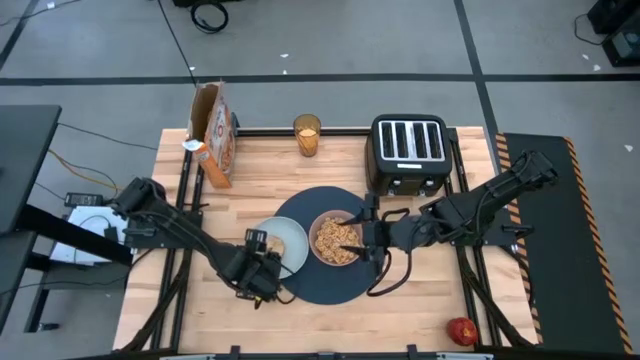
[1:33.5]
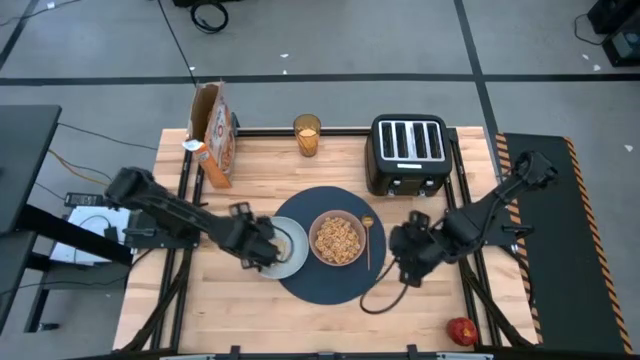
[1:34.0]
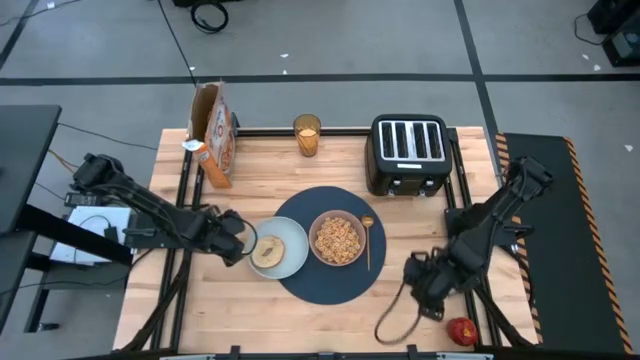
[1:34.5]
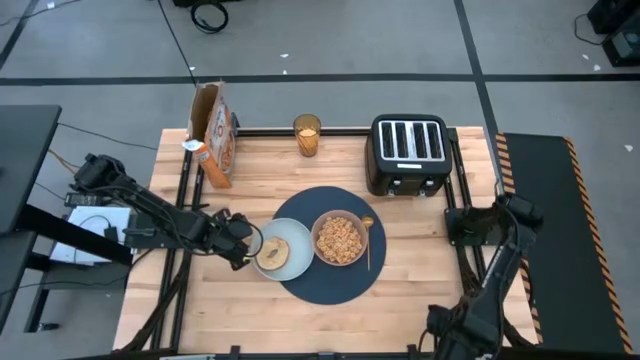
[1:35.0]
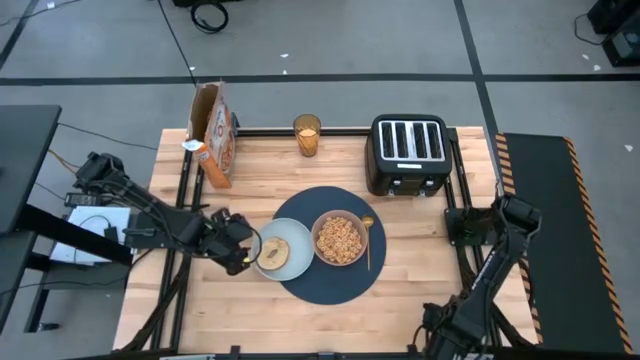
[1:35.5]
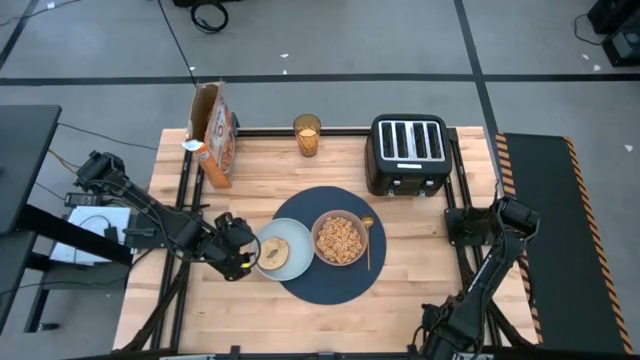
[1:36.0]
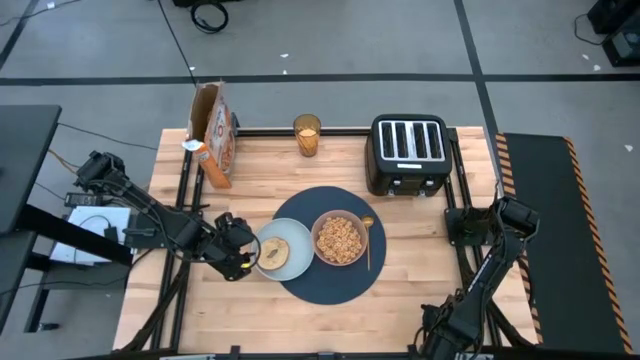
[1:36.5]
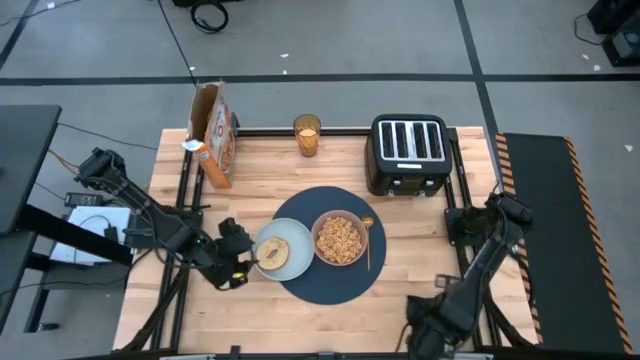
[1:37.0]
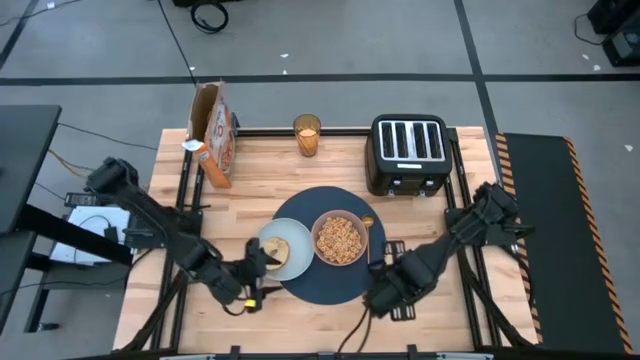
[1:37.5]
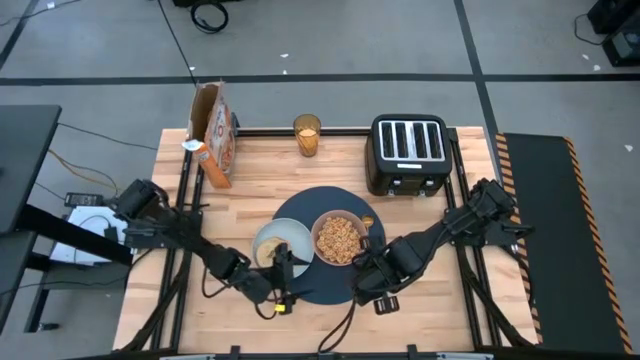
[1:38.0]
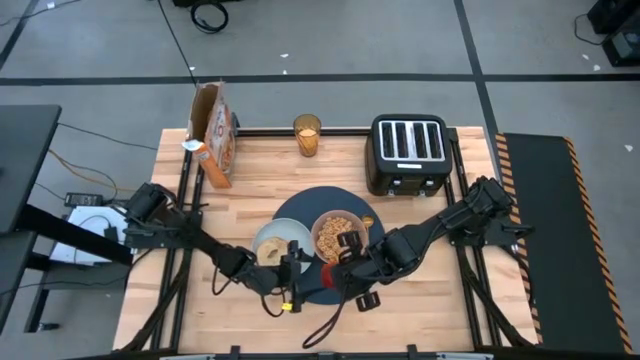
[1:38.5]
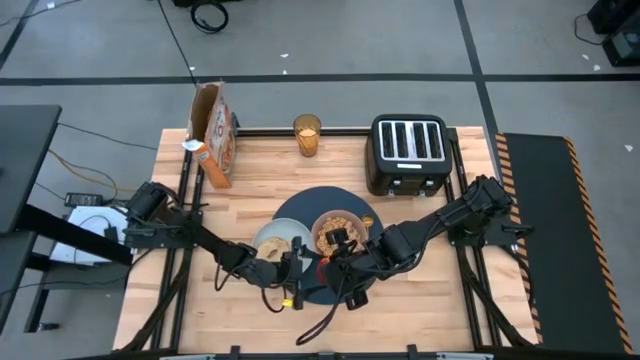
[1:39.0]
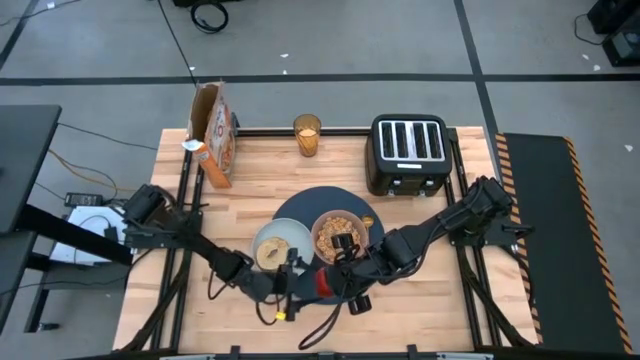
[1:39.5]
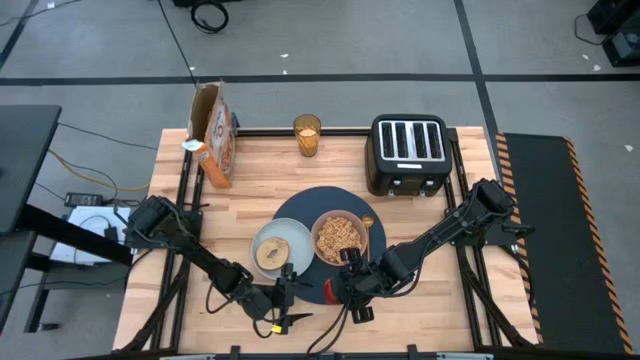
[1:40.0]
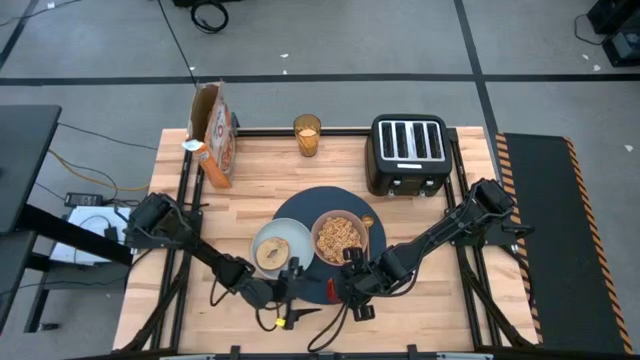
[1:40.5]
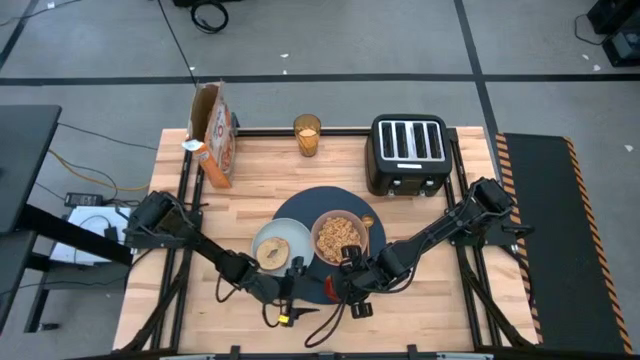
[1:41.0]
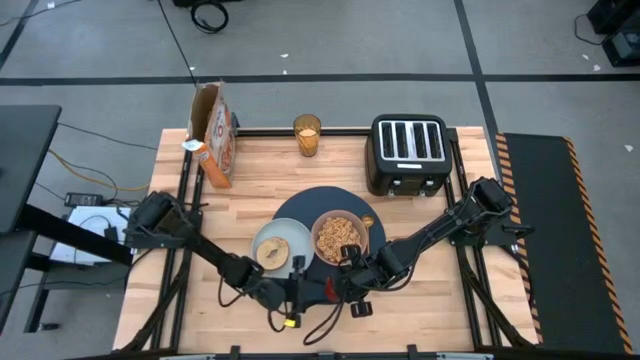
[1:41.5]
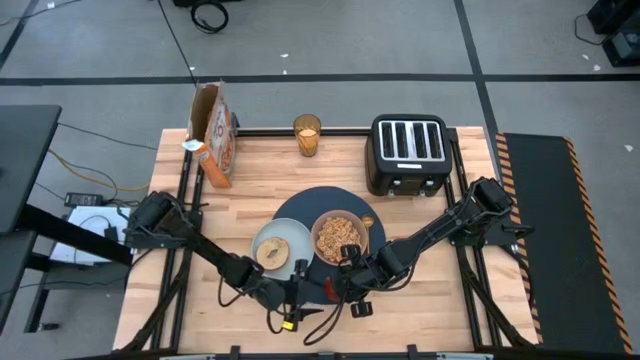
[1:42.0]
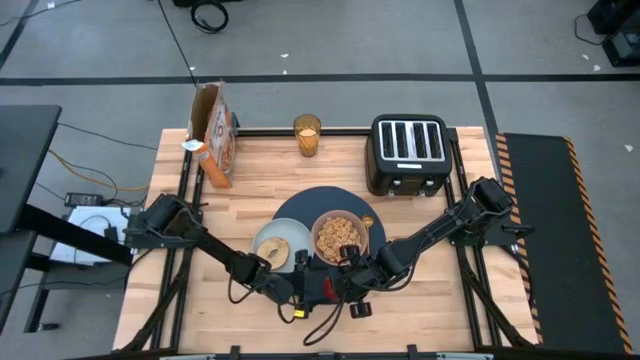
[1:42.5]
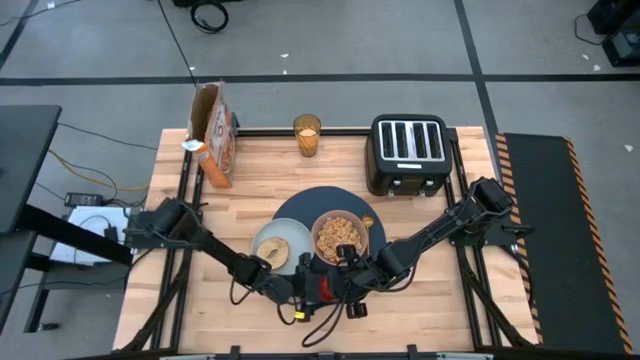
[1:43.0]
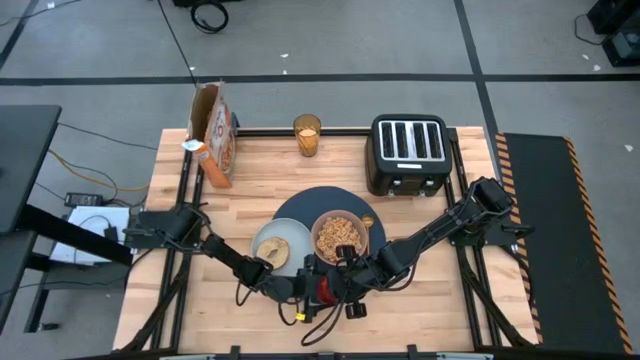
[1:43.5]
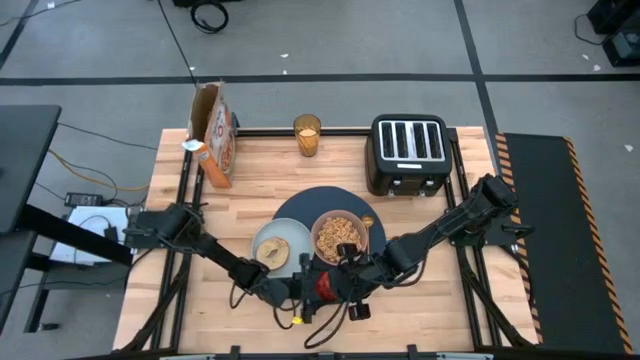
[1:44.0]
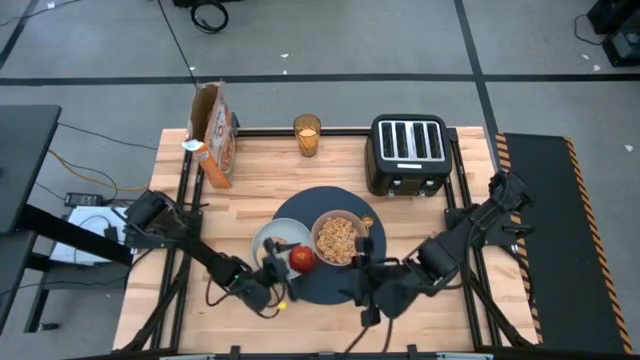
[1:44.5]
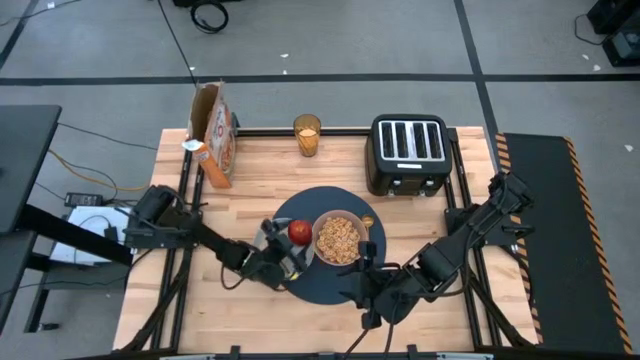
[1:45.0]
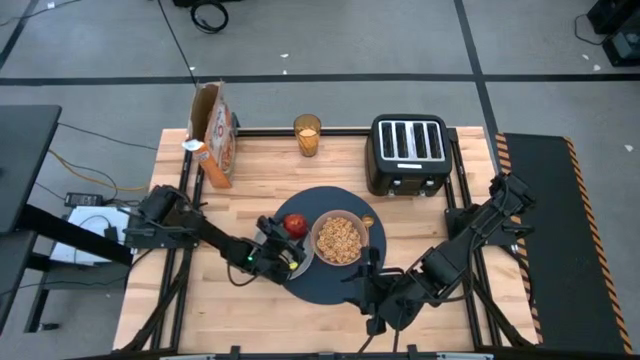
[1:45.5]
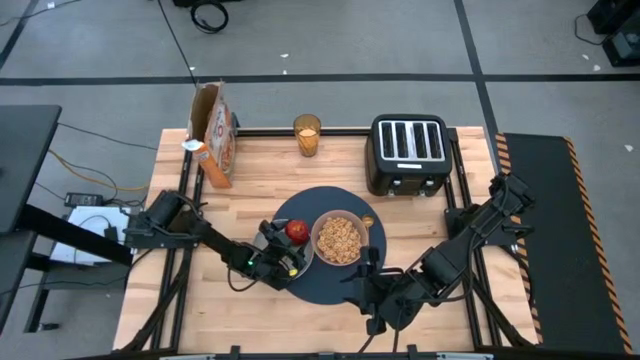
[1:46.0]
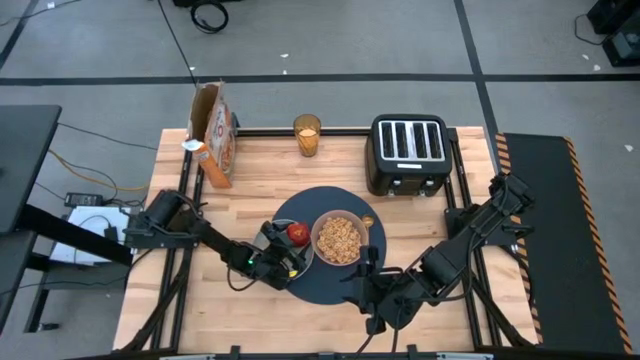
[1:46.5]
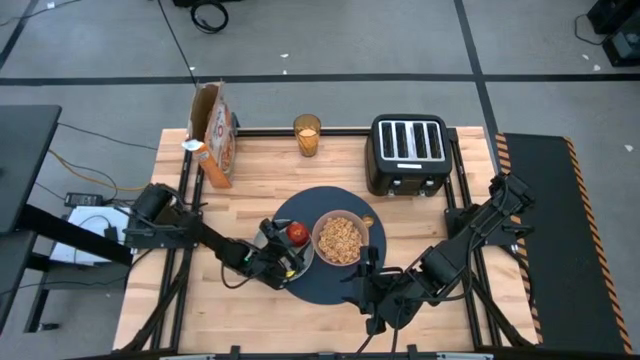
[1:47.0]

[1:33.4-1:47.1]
Task: Arrange a breakfast setting
Put the apple on the plate

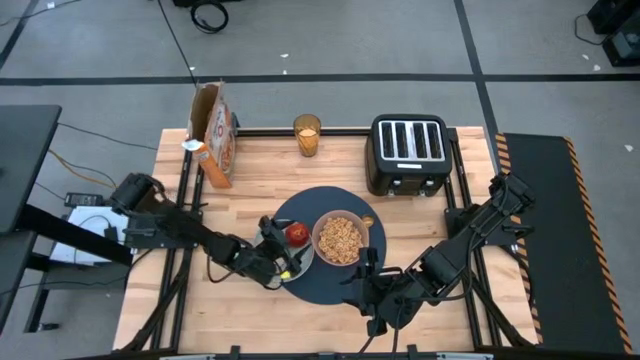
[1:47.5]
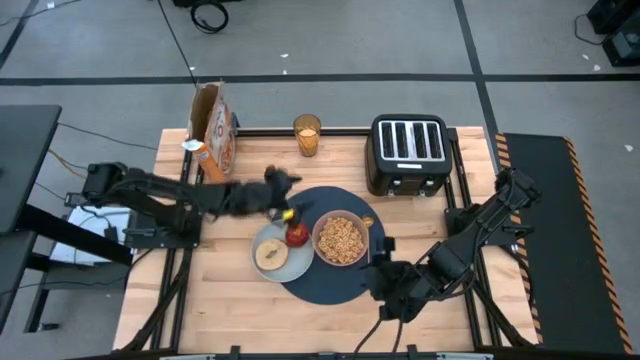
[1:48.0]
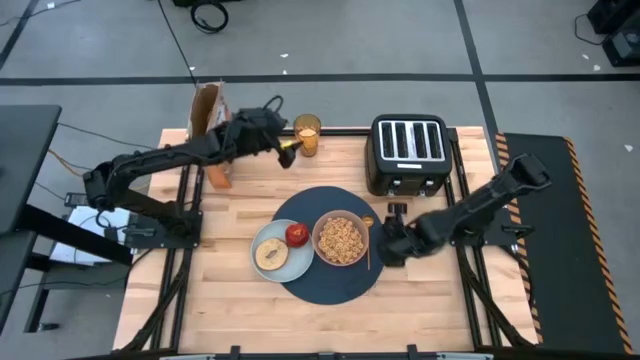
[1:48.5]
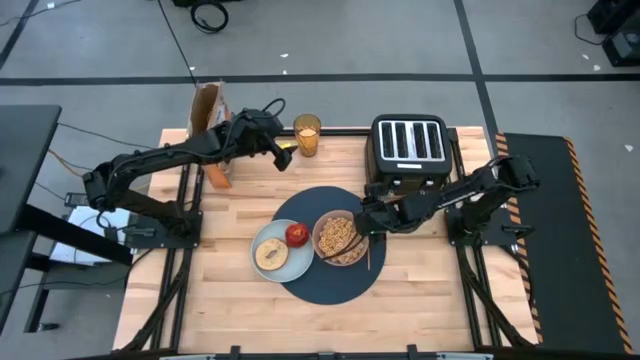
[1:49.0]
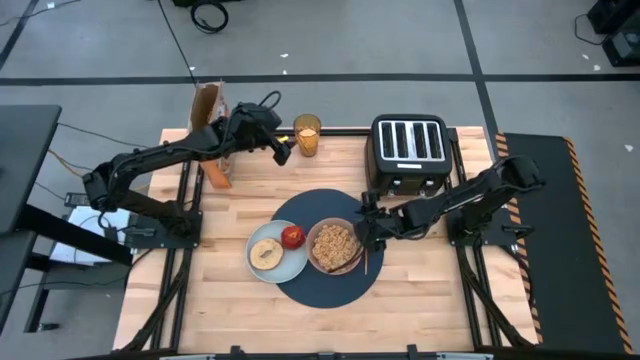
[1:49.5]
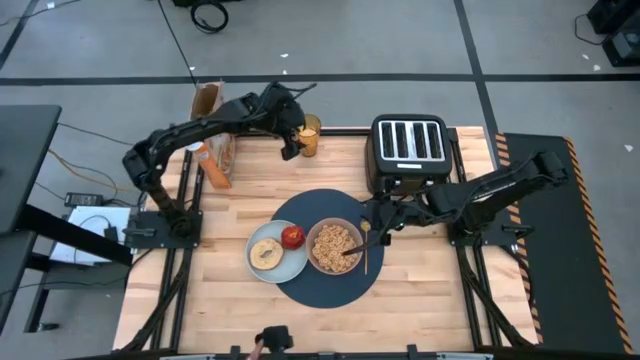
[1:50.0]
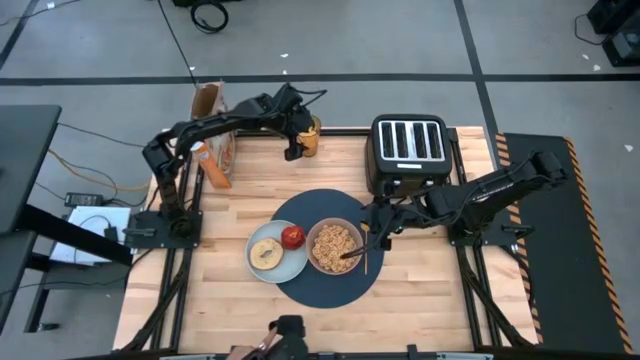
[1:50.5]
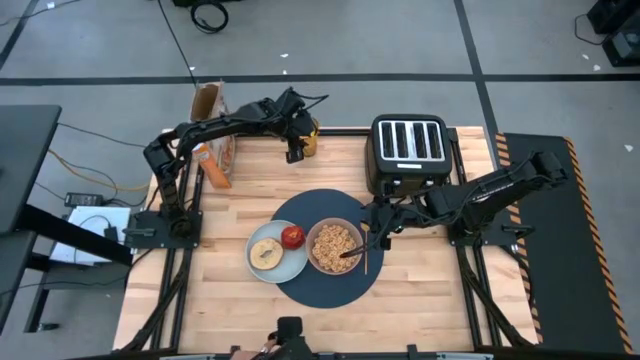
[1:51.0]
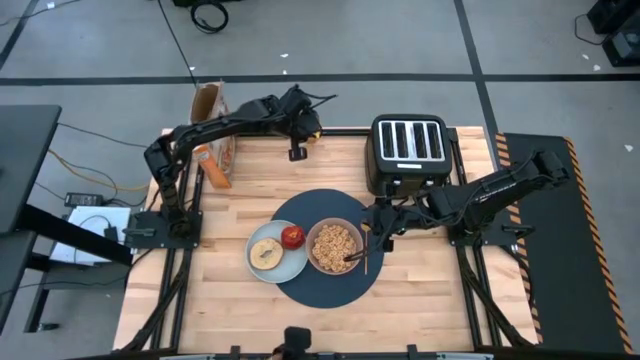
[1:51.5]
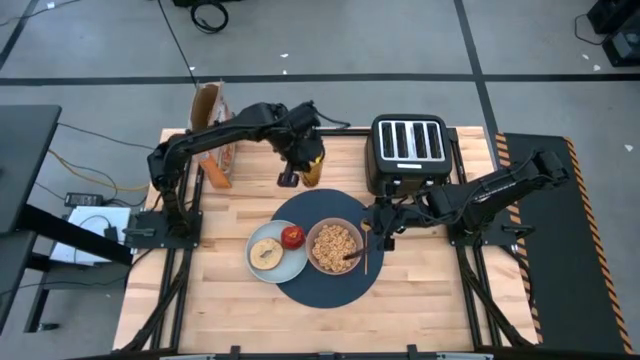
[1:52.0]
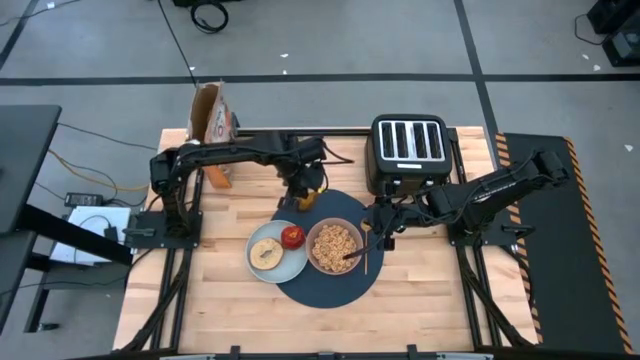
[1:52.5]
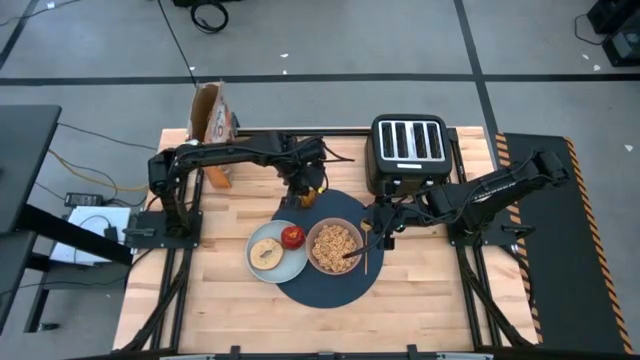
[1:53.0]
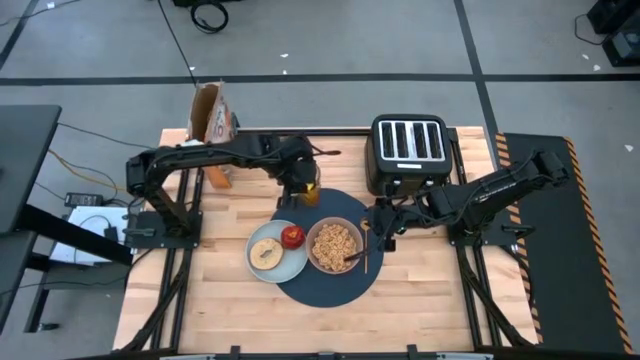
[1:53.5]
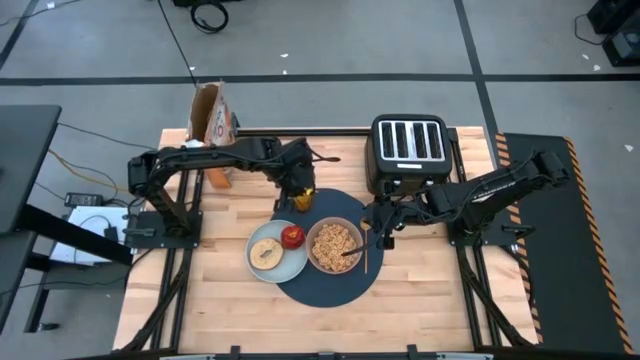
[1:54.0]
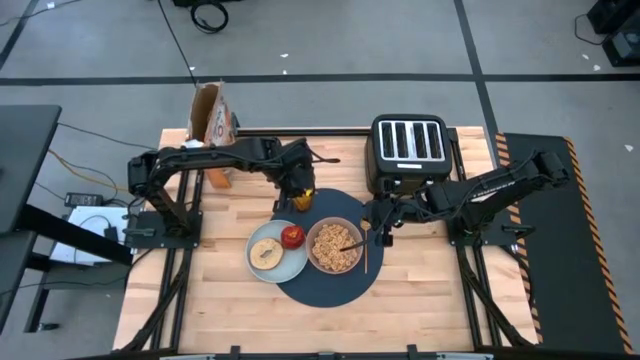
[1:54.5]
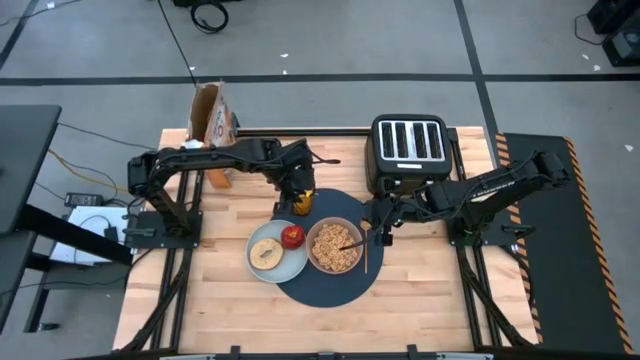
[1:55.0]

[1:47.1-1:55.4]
Put the glass on the top of the placemat
